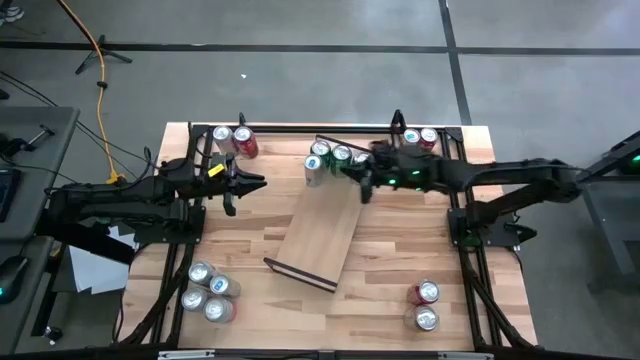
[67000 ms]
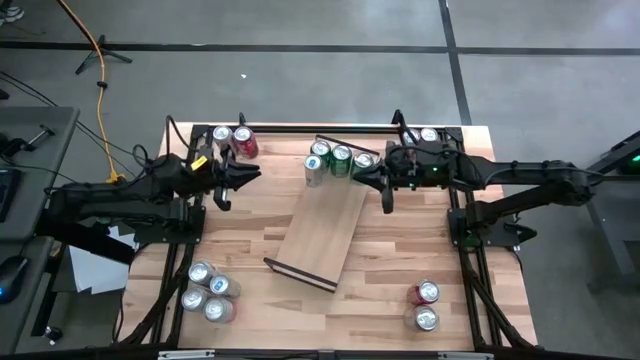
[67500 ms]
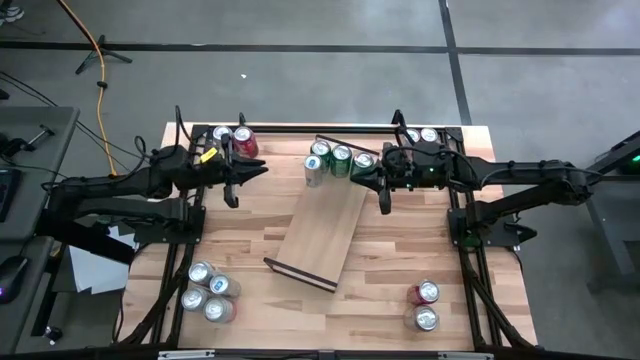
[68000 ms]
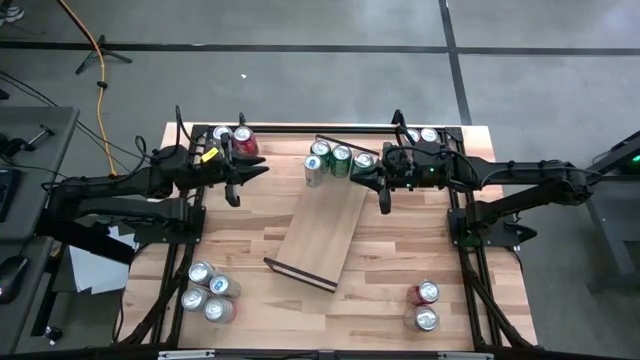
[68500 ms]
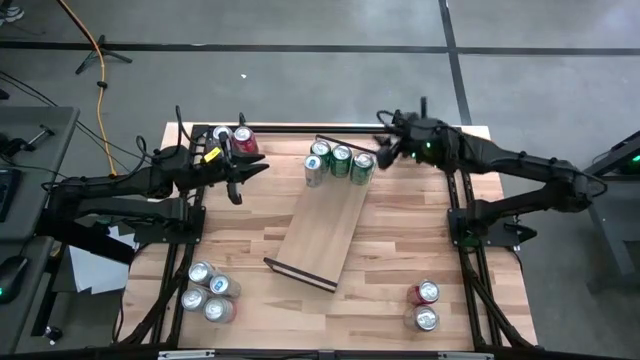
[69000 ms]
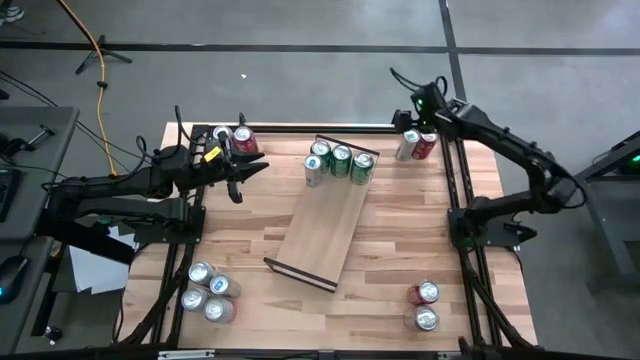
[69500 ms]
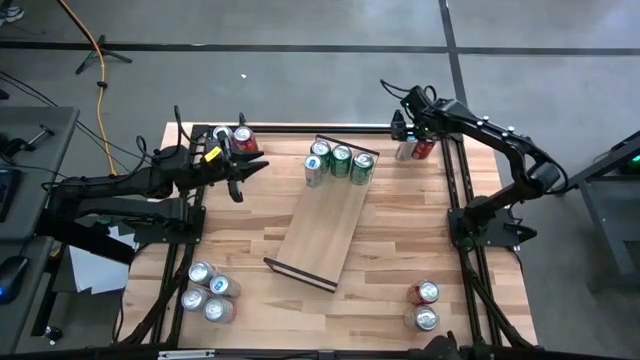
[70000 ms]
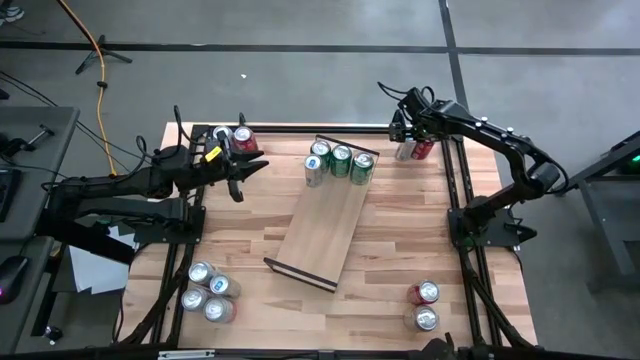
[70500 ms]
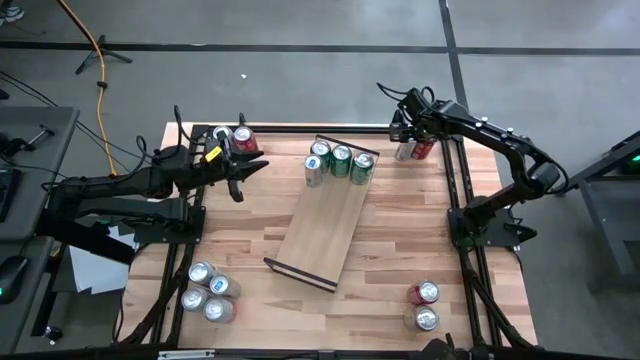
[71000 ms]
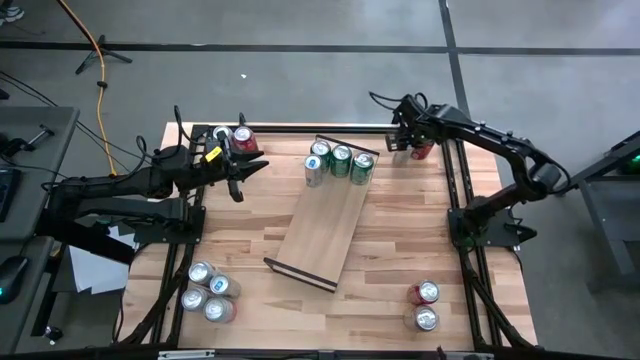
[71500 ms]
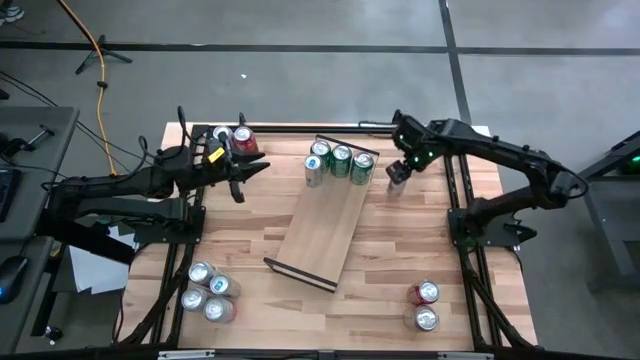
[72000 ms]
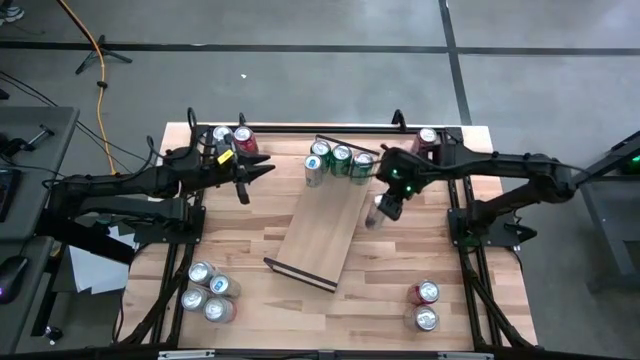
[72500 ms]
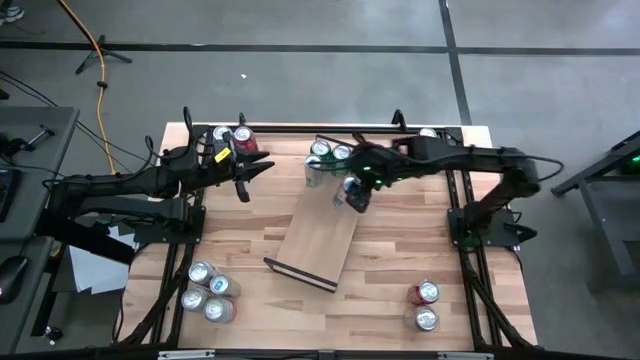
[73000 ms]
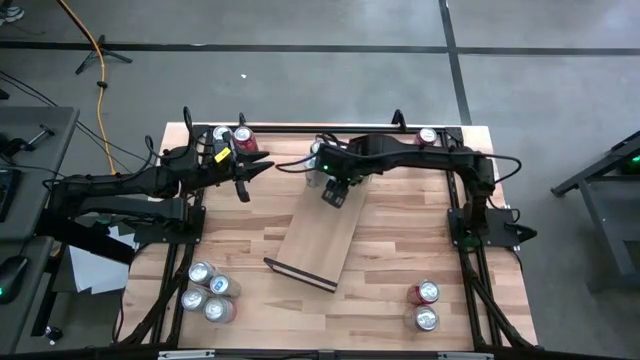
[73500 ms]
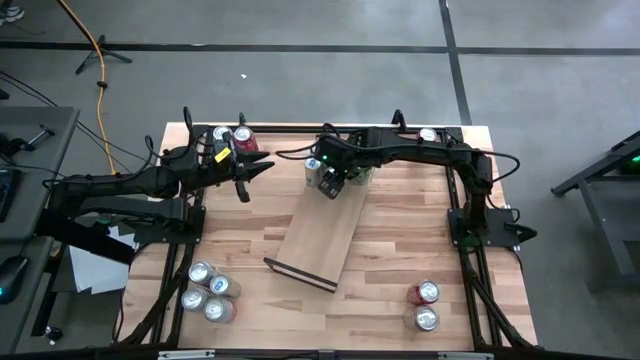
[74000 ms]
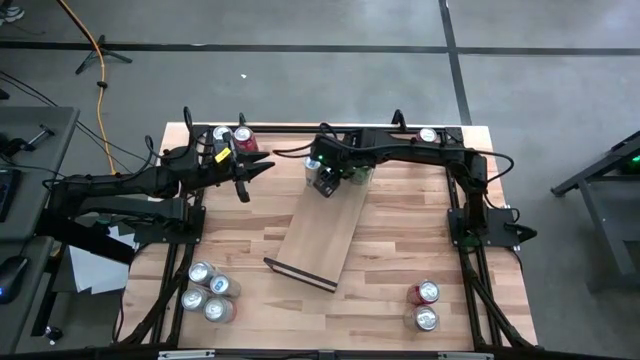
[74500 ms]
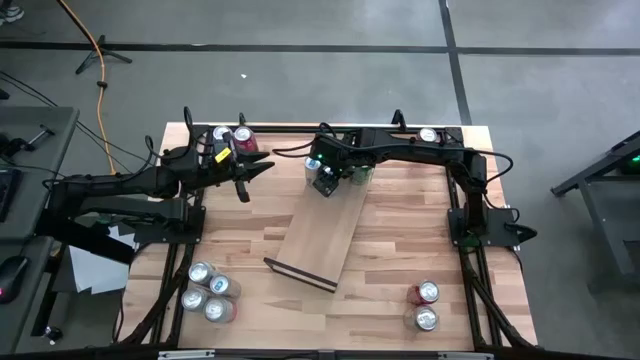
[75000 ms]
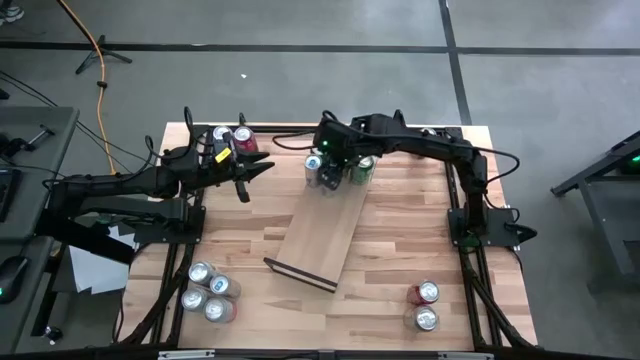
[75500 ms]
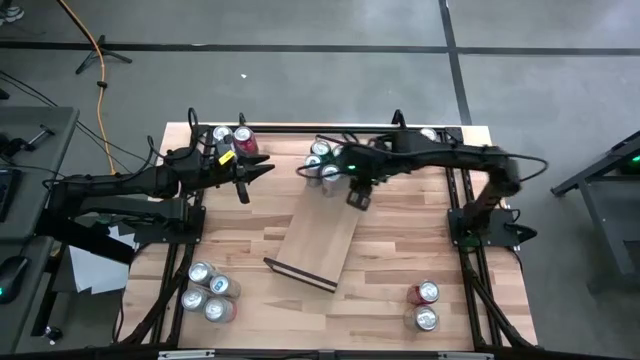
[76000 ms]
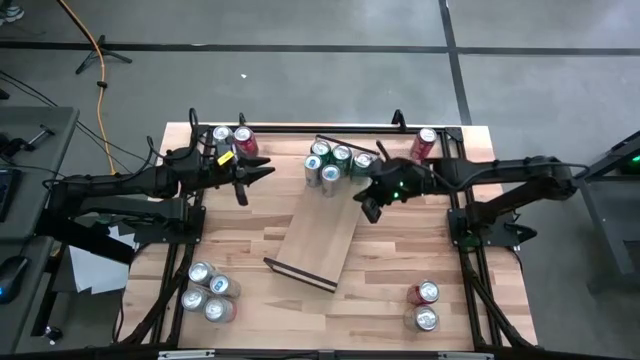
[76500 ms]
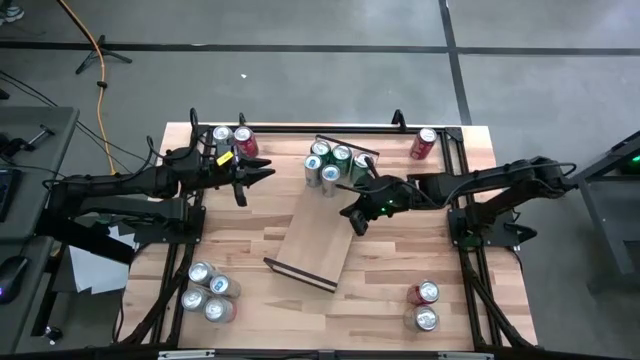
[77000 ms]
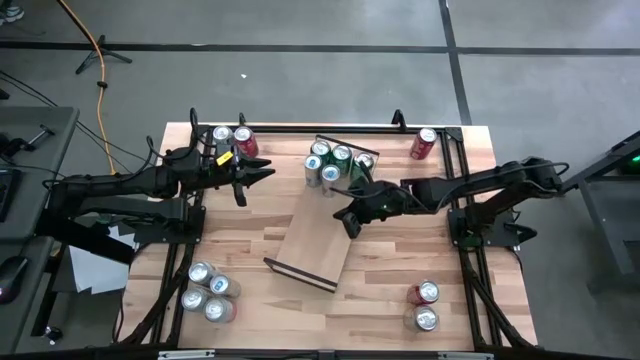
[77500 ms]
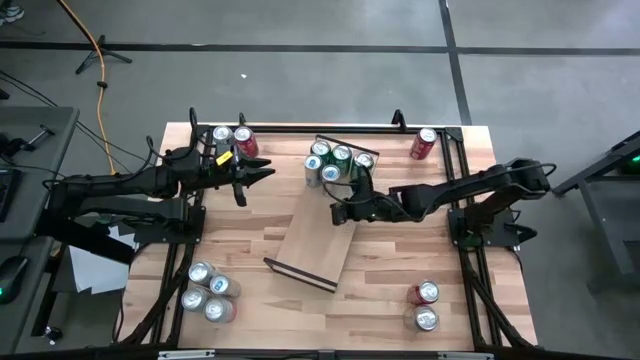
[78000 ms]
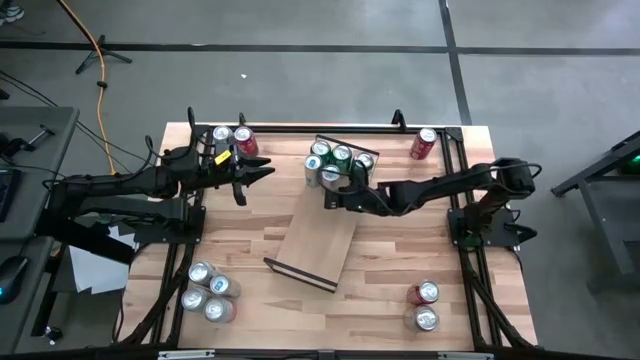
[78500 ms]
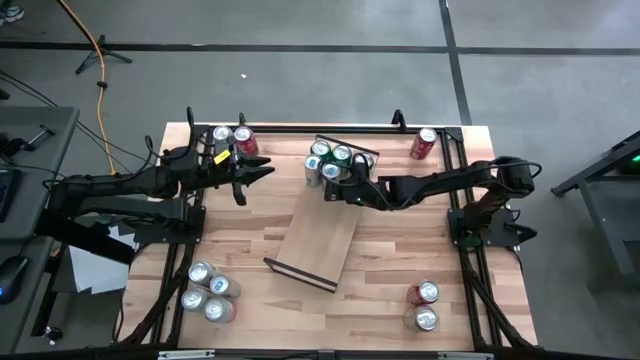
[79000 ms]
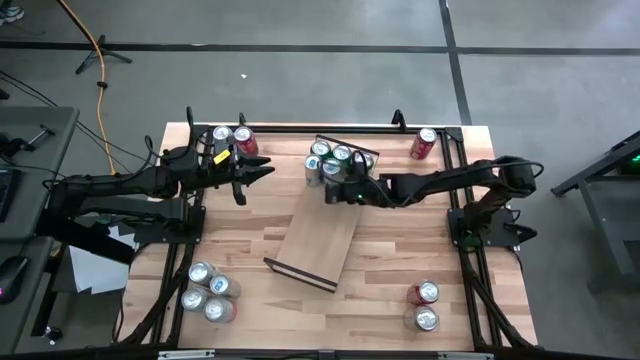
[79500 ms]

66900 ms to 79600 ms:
Task: Place canned beverage on shelf
Put the top blue soda can on the shelf aligned with the other blue soda can
